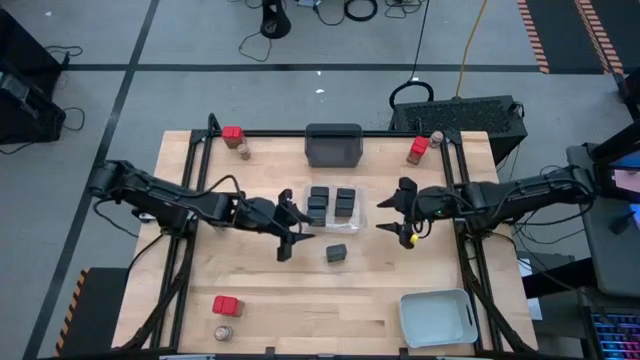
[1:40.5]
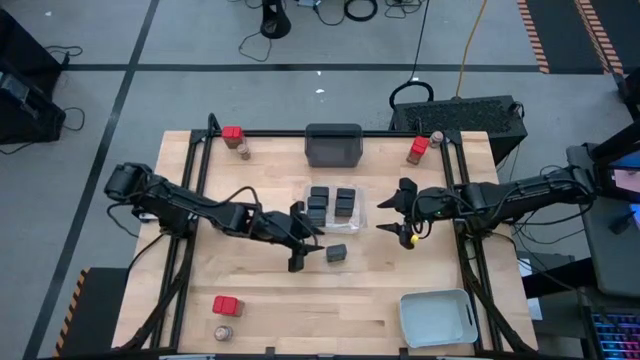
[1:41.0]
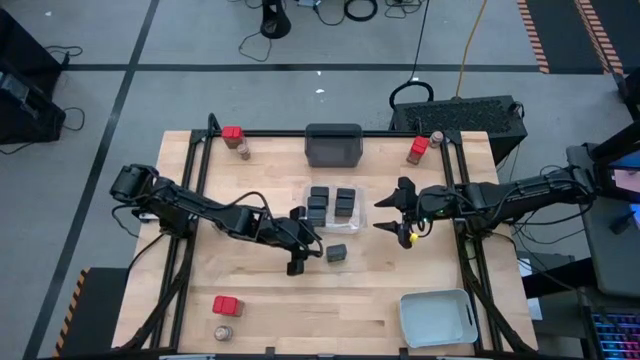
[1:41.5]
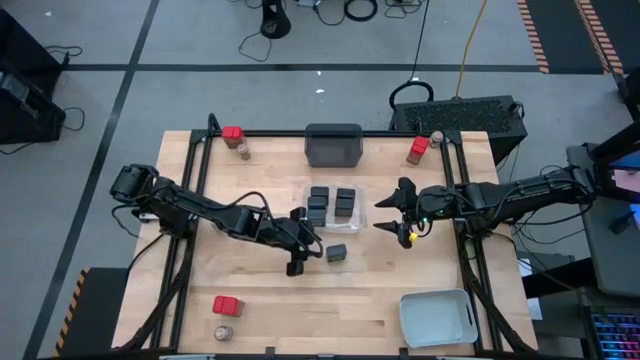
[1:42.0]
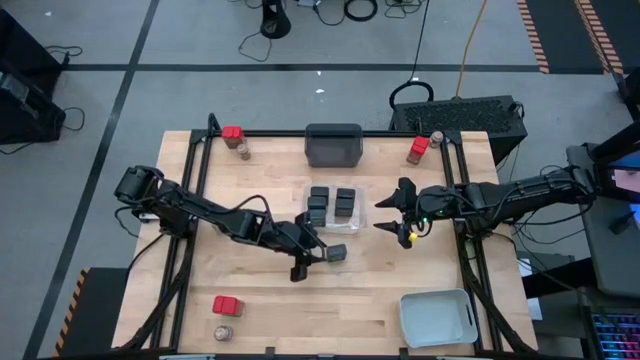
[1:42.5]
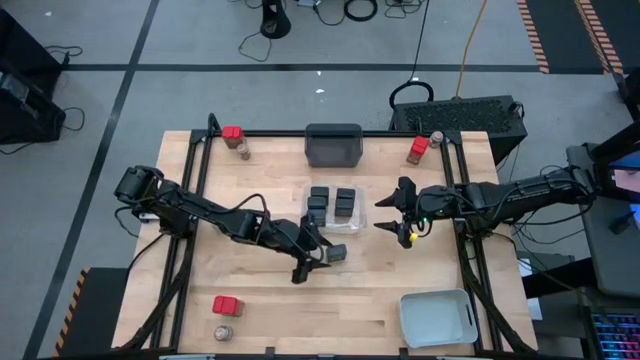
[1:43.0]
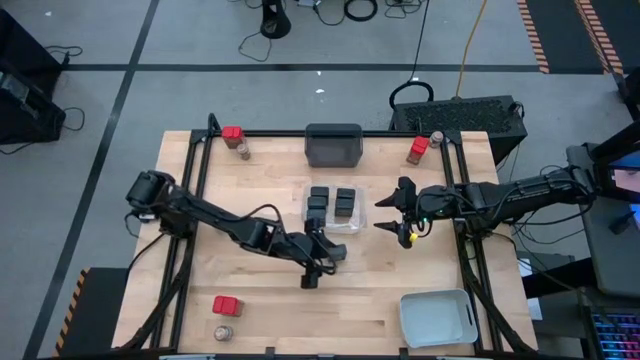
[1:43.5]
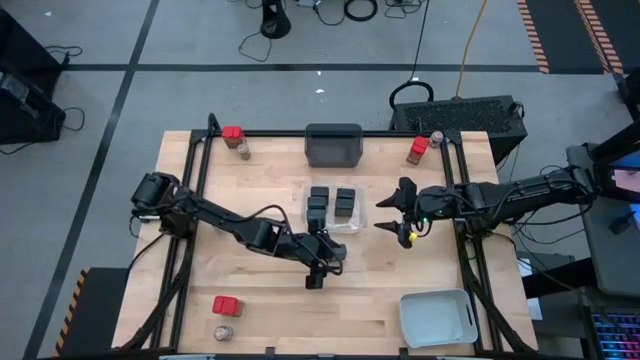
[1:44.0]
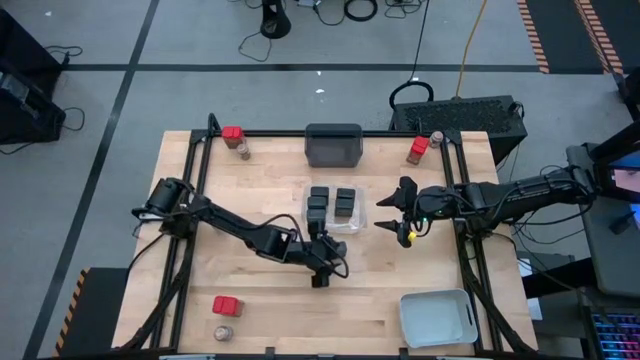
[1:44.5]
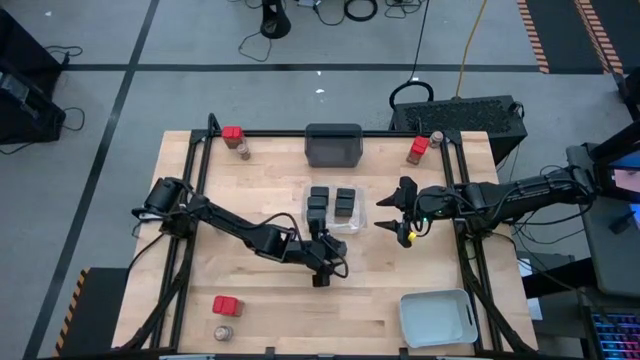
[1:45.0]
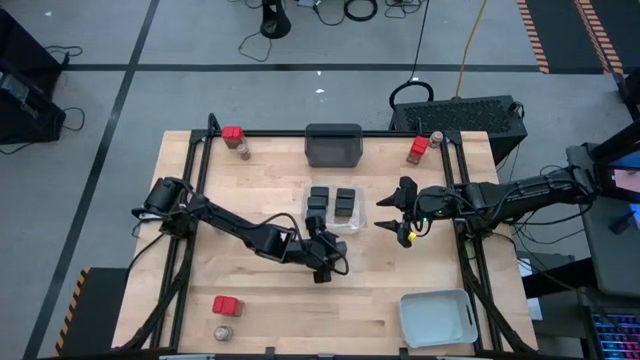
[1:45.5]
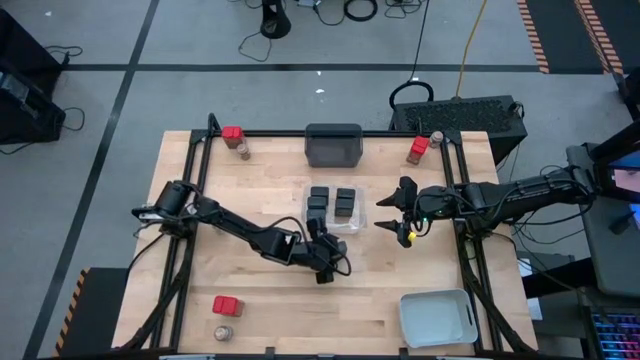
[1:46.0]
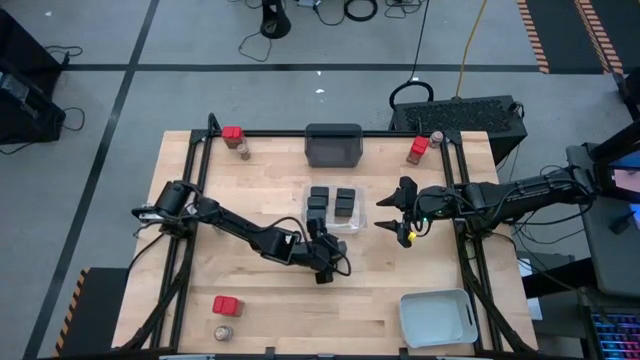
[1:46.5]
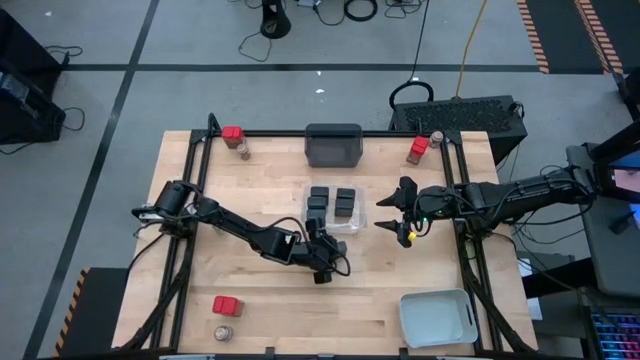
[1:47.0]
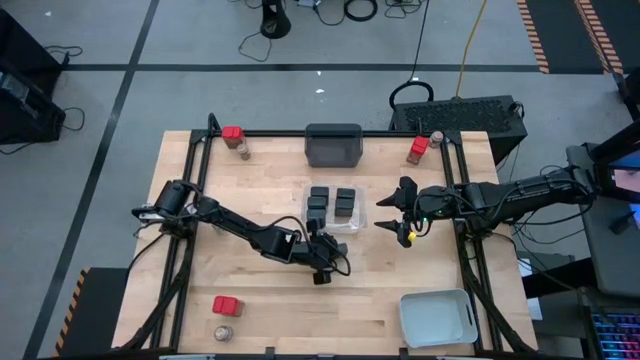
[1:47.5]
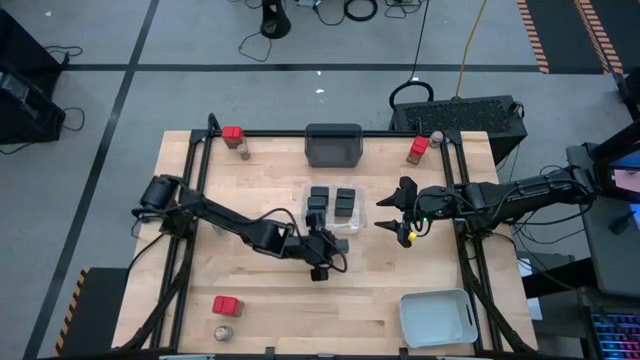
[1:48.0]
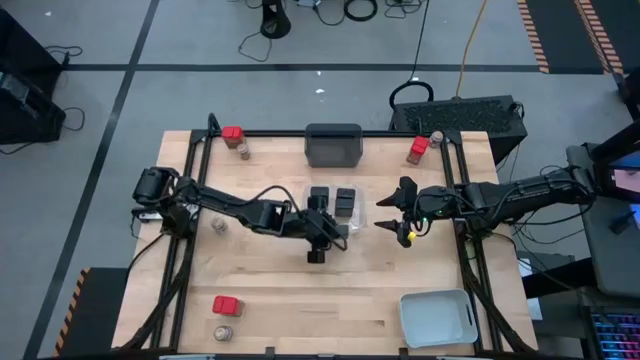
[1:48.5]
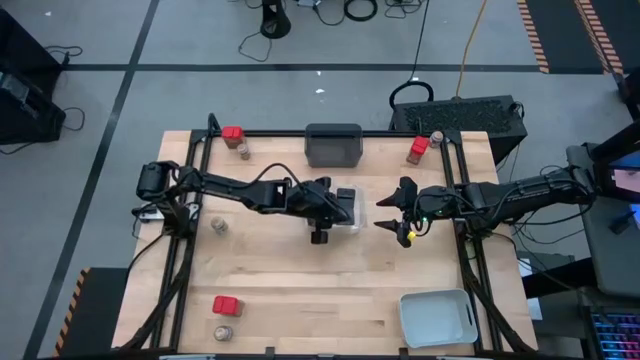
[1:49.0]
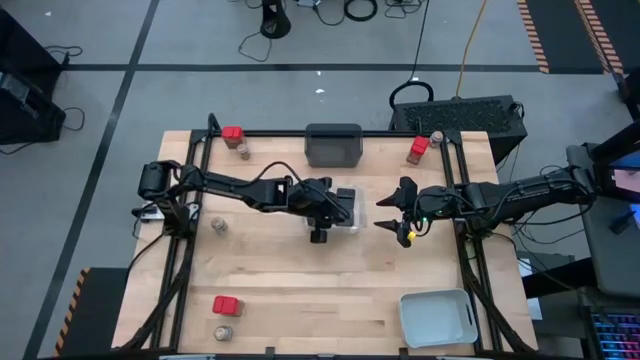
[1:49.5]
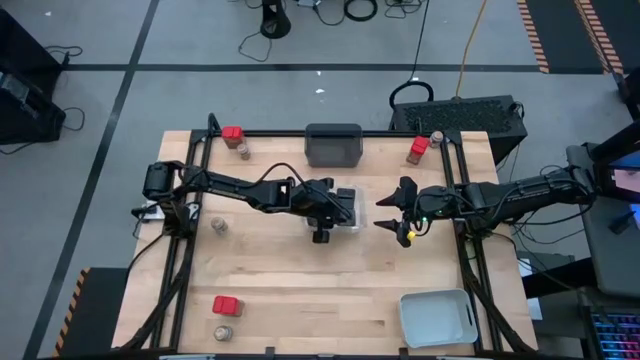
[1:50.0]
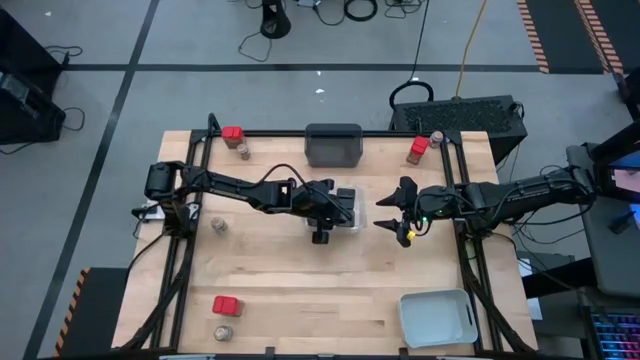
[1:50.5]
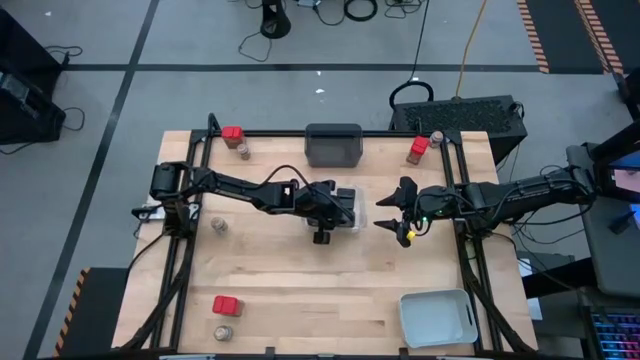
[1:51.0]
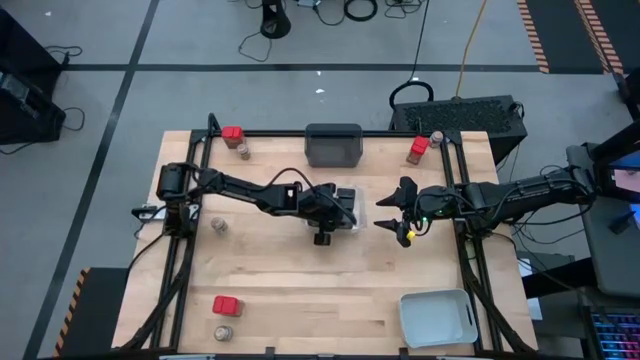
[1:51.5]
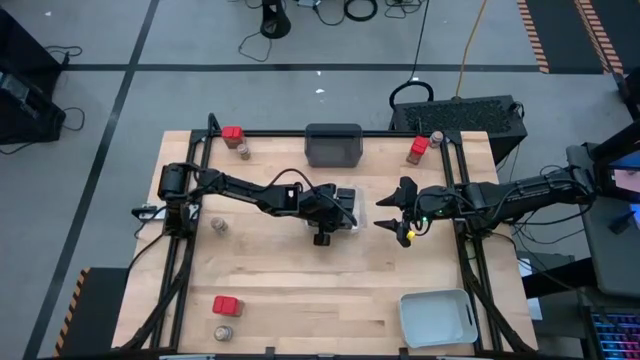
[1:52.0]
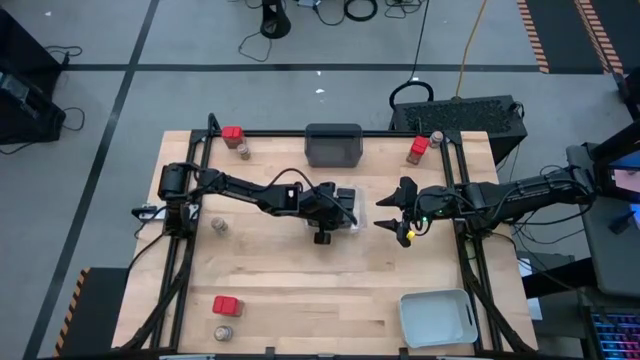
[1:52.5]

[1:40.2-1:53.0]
Task: Sort spices by type
Put the green seasoning into the transparent bin

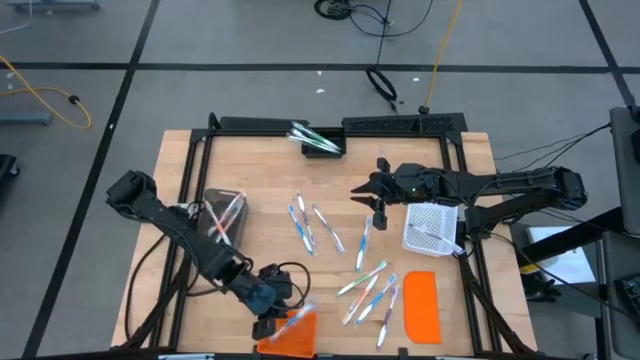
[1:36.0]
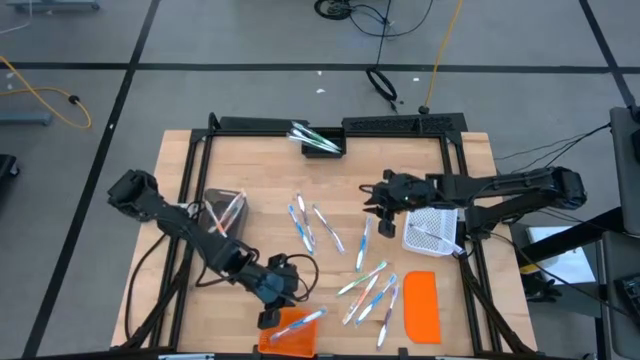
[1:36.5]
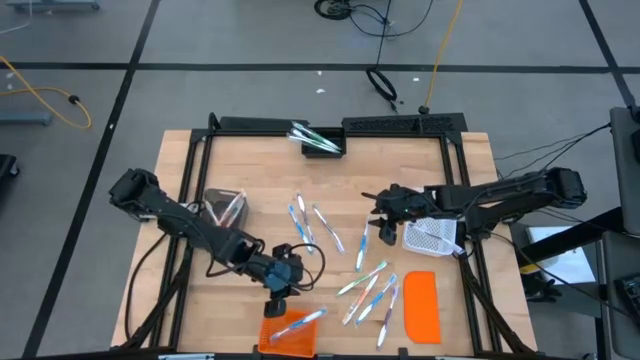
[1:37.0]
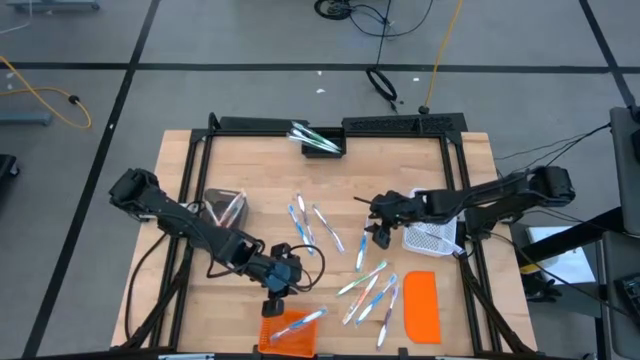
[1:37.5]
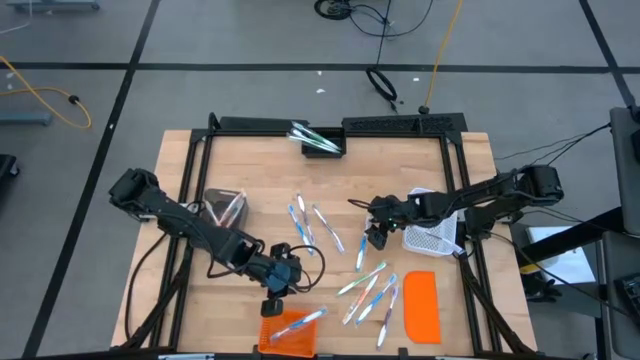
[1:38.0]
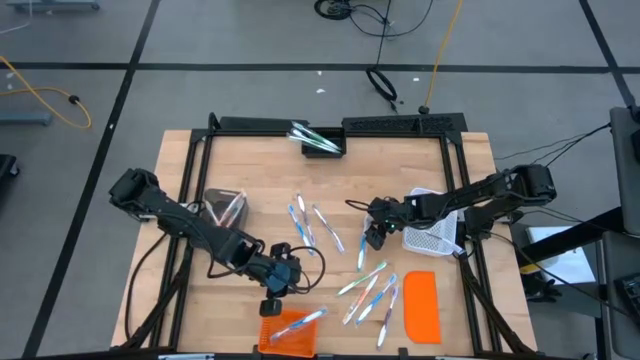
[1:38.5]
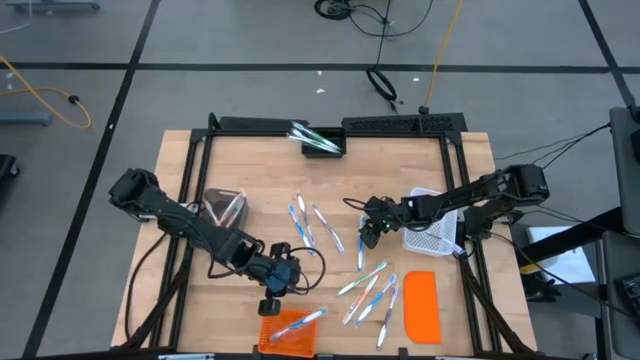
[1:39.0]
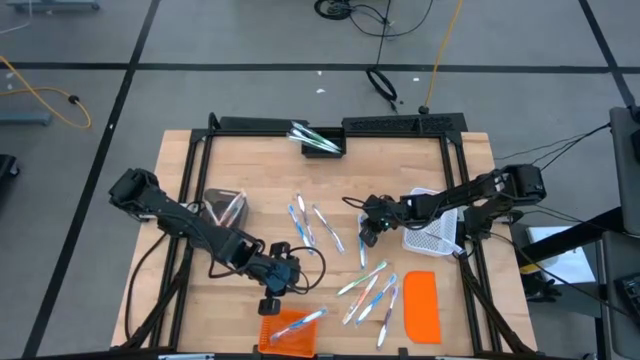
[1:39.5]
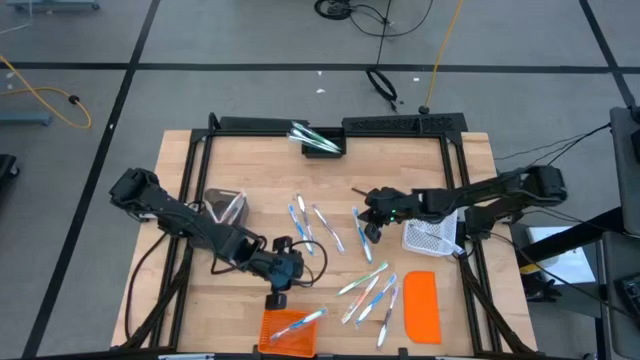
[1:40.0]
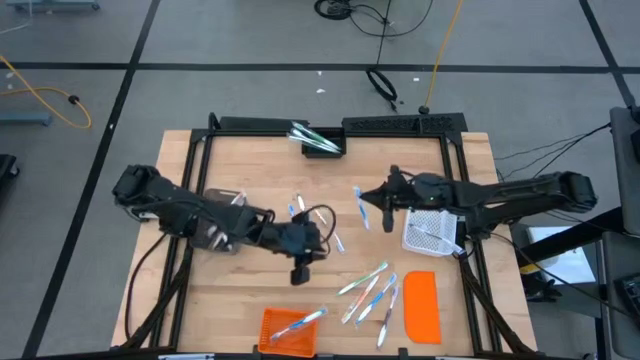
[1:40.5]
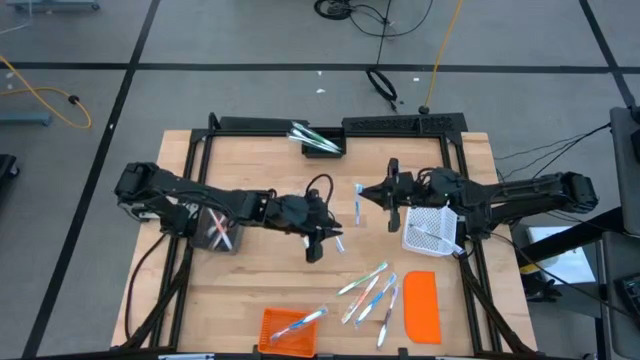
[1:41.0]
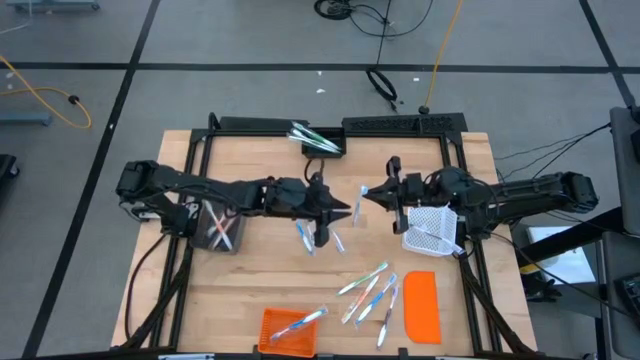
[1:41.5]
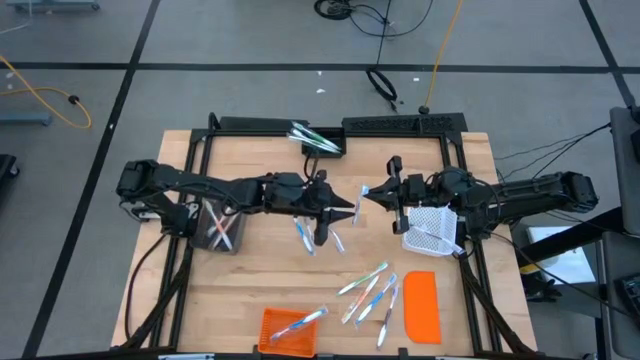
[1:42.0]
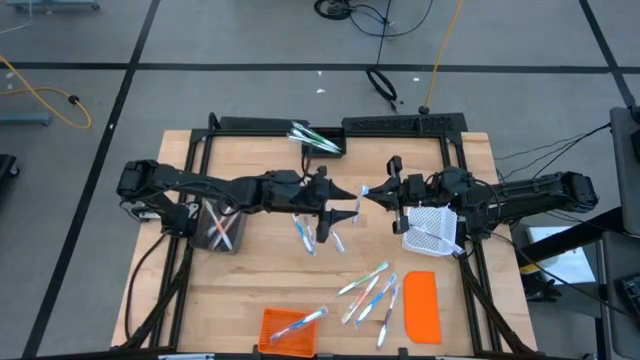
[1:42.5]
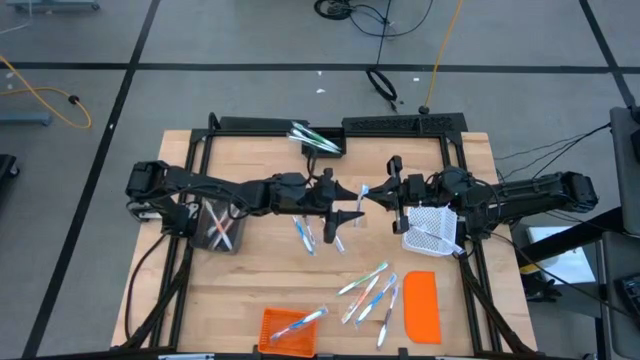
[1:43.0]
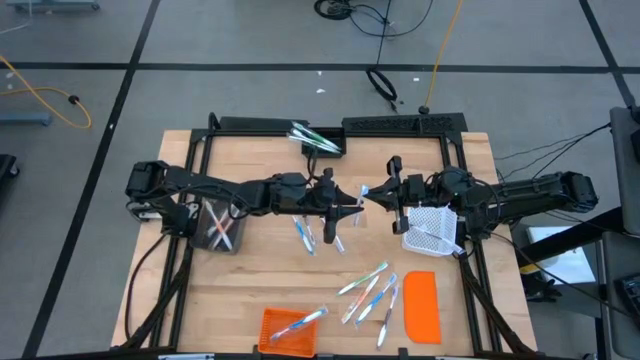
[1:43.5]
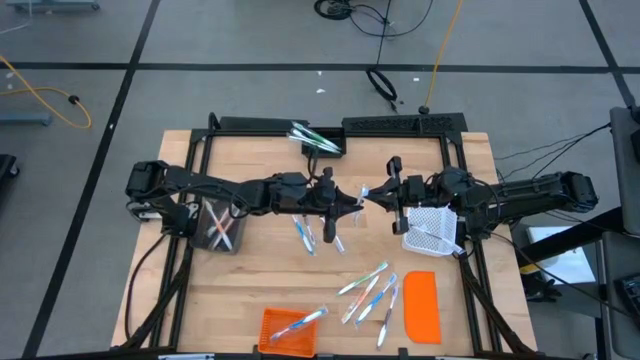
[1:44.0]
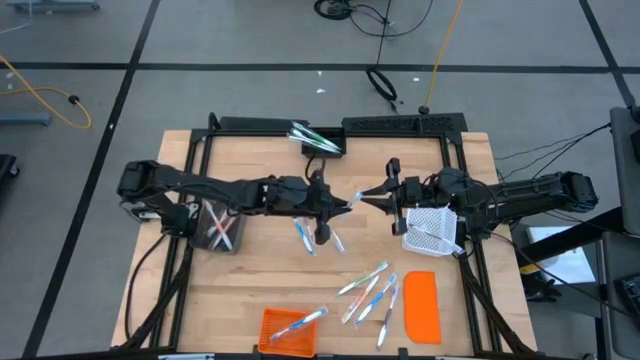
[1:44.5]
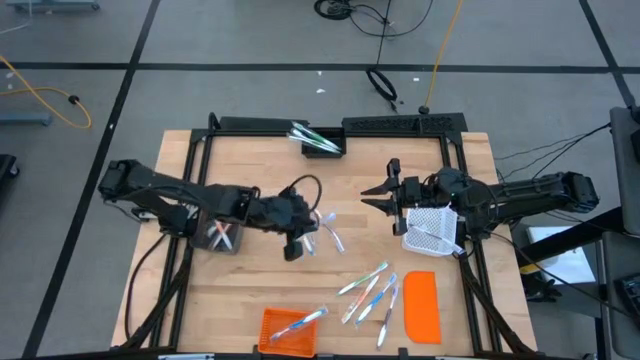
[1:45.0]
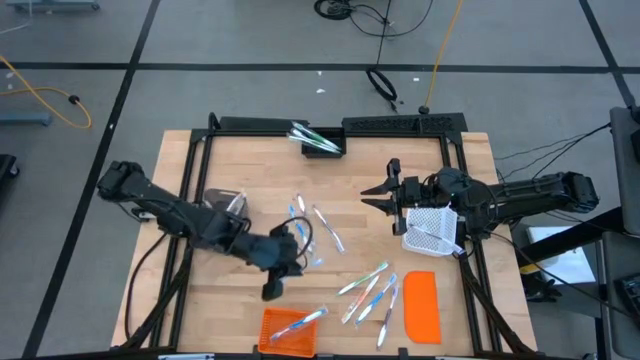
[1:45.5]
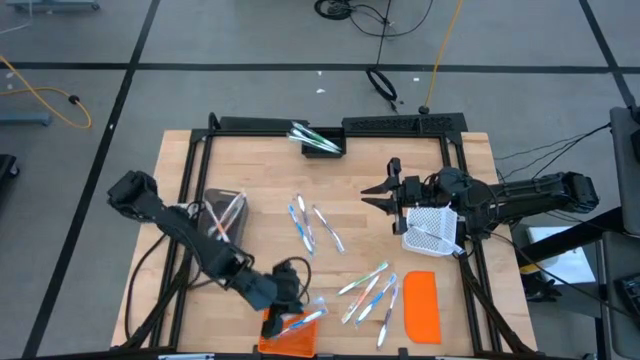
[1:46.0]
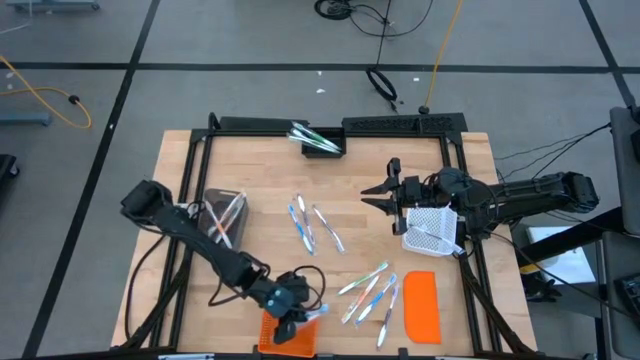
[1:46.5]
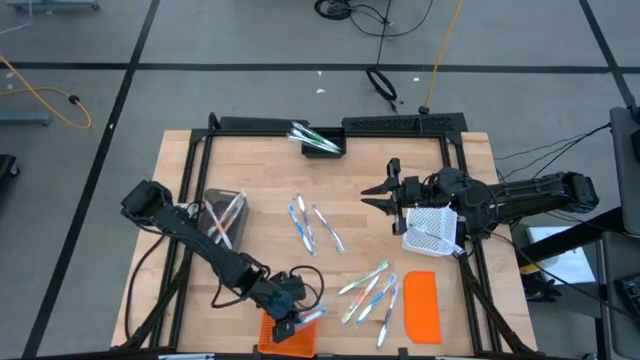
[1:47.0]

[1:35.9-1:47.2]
Task: Pick & Place Toothbrushes
Put the blue toothbrush into the orange bin
